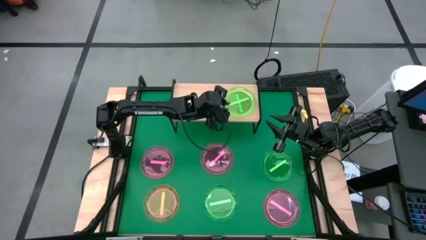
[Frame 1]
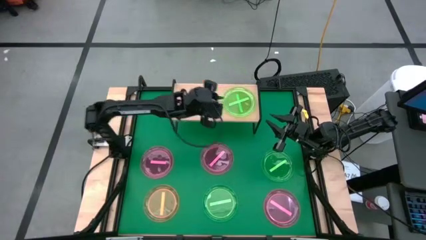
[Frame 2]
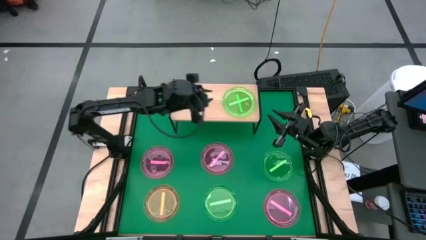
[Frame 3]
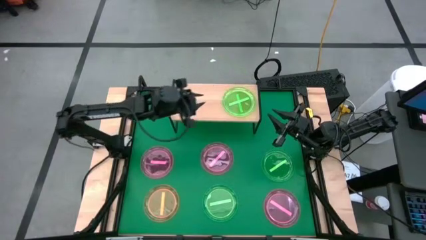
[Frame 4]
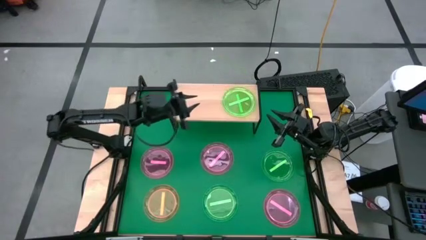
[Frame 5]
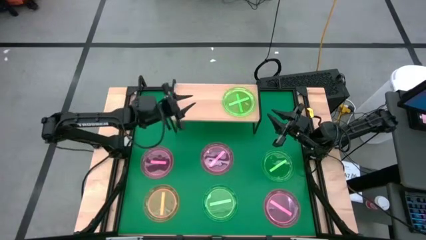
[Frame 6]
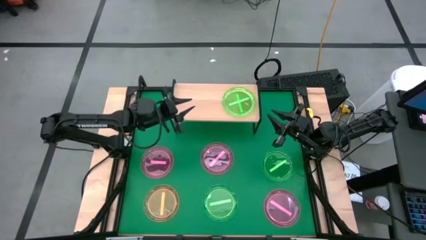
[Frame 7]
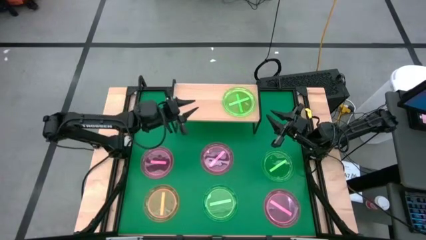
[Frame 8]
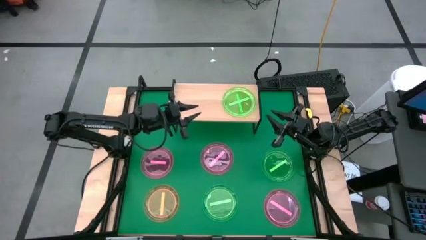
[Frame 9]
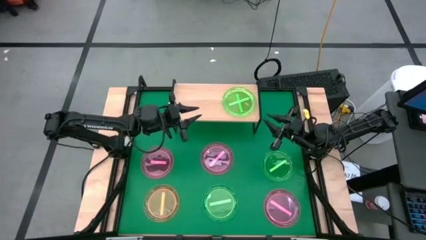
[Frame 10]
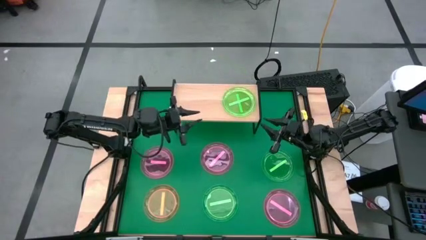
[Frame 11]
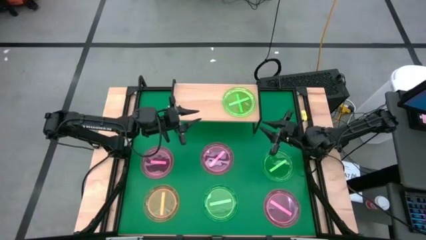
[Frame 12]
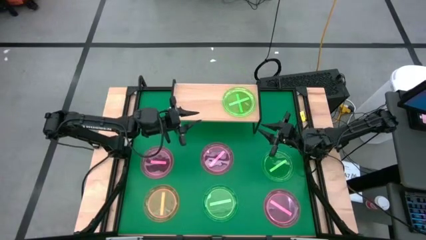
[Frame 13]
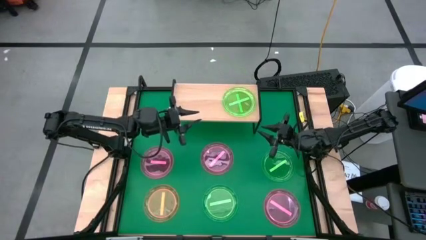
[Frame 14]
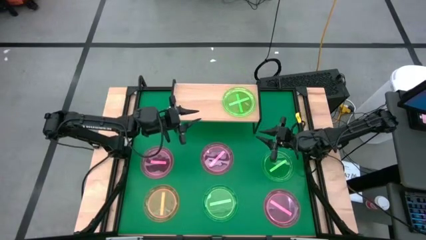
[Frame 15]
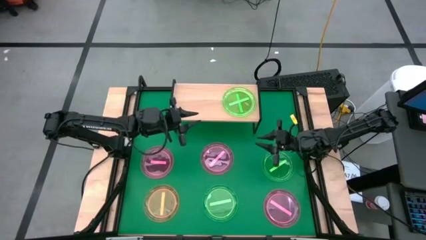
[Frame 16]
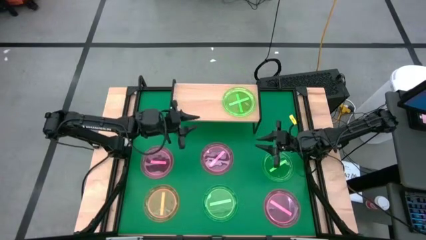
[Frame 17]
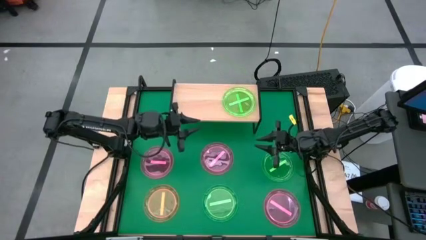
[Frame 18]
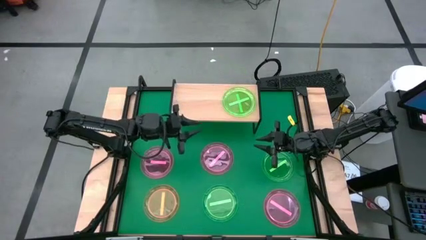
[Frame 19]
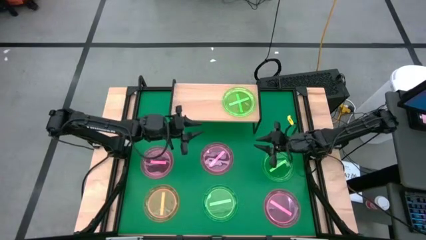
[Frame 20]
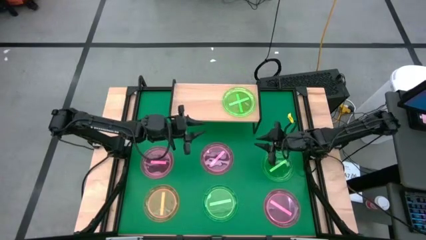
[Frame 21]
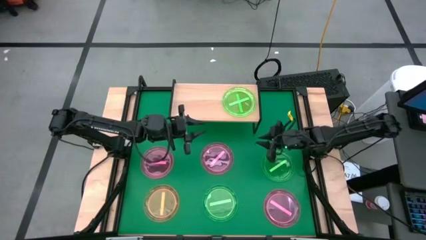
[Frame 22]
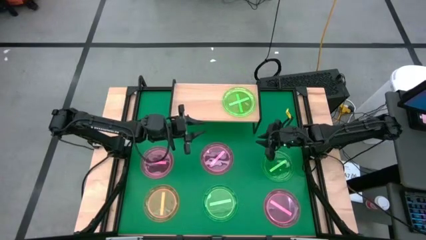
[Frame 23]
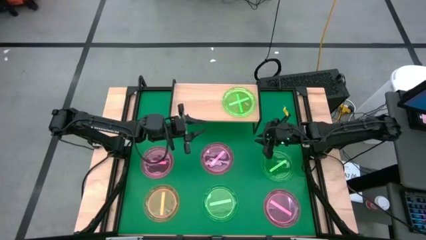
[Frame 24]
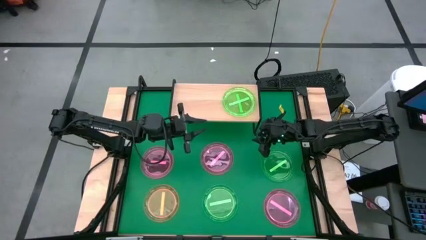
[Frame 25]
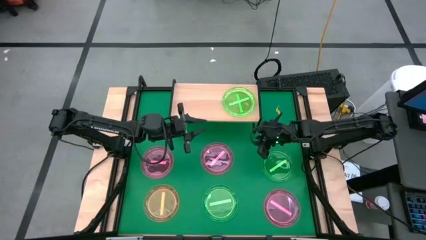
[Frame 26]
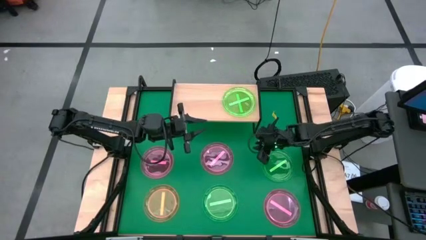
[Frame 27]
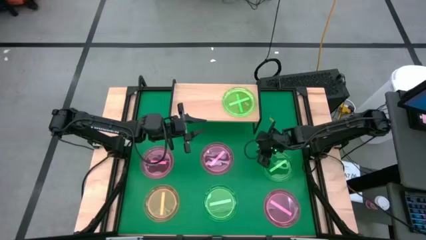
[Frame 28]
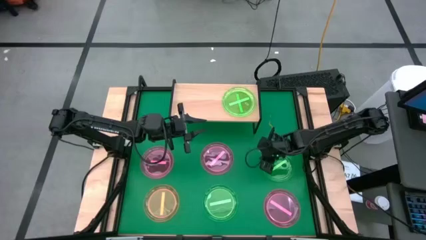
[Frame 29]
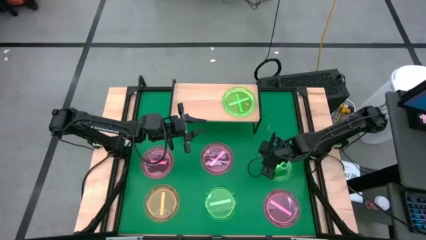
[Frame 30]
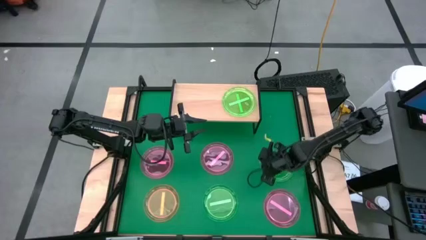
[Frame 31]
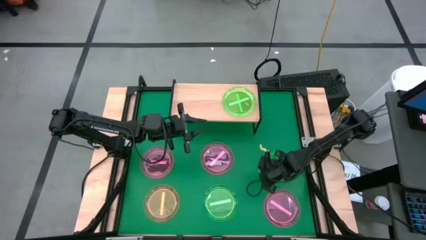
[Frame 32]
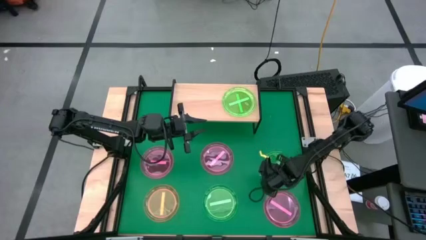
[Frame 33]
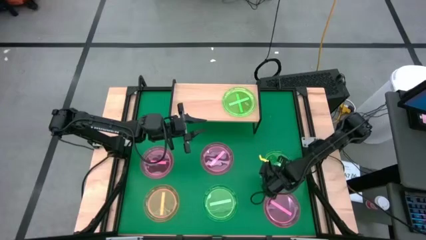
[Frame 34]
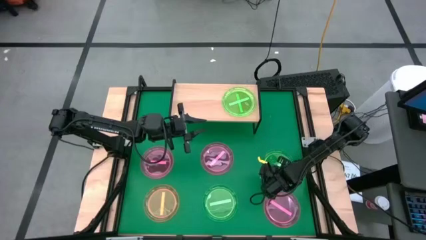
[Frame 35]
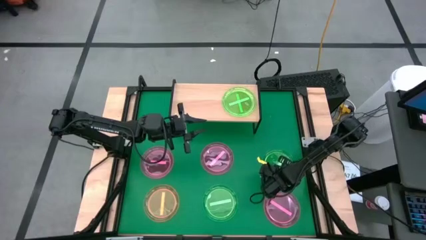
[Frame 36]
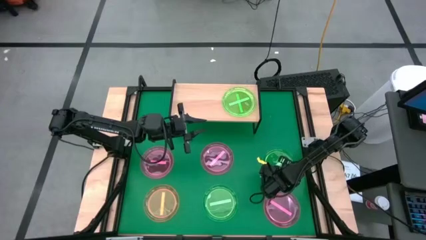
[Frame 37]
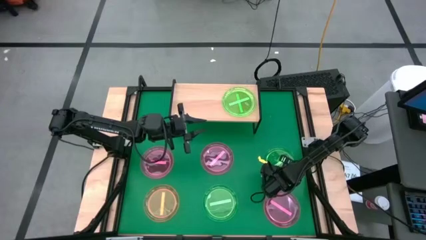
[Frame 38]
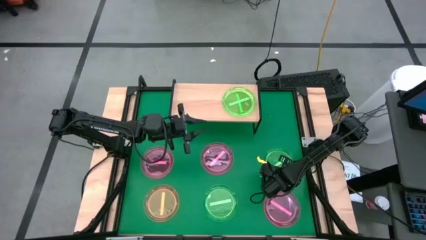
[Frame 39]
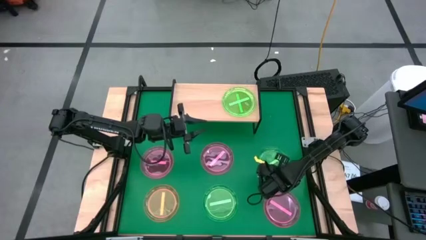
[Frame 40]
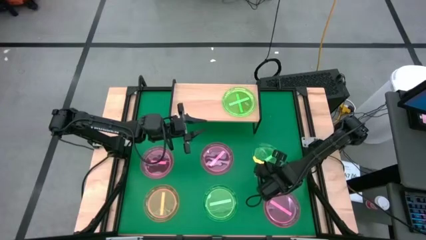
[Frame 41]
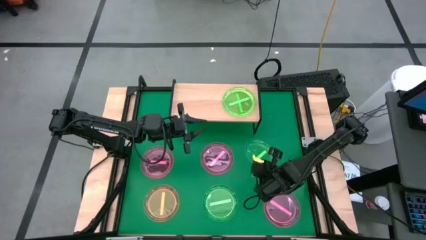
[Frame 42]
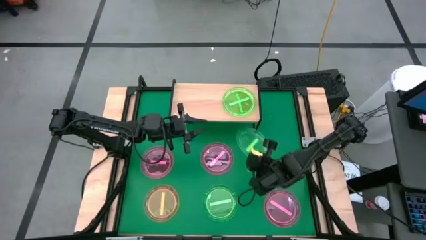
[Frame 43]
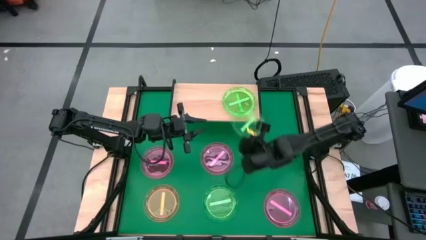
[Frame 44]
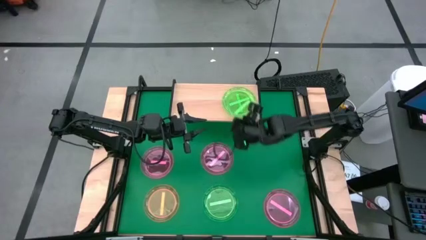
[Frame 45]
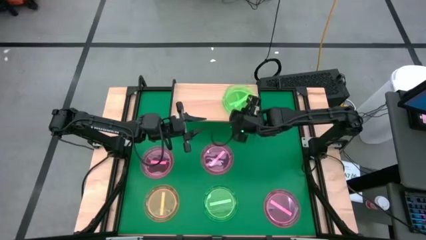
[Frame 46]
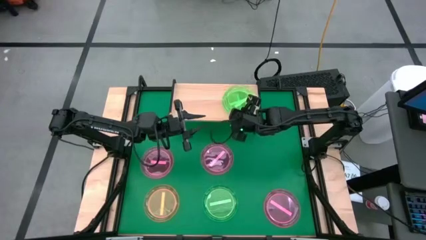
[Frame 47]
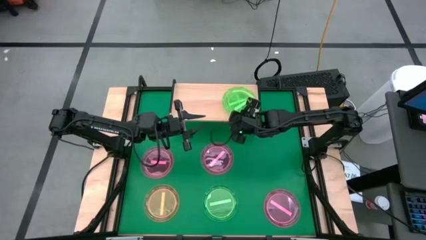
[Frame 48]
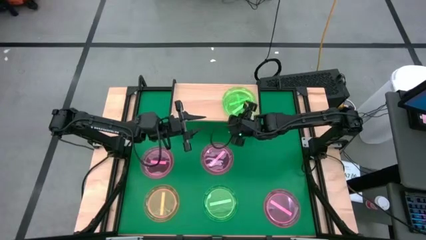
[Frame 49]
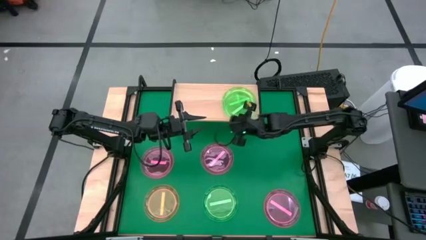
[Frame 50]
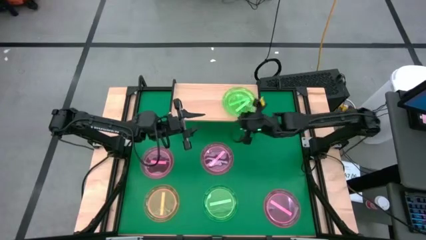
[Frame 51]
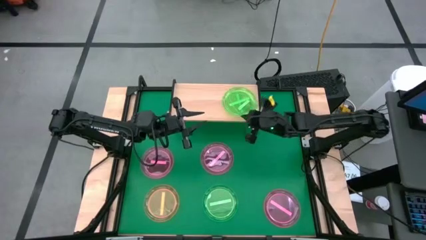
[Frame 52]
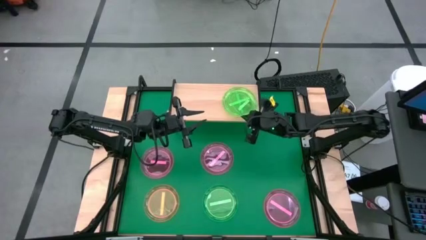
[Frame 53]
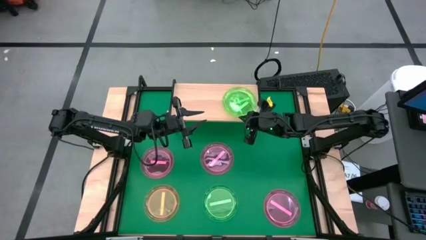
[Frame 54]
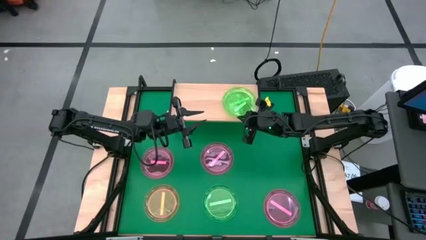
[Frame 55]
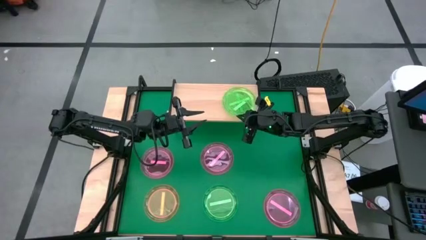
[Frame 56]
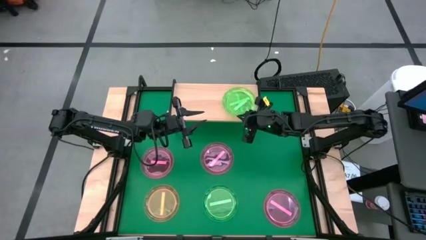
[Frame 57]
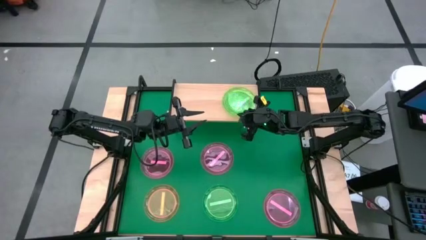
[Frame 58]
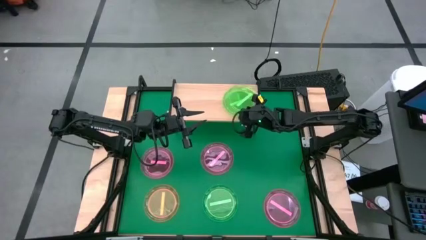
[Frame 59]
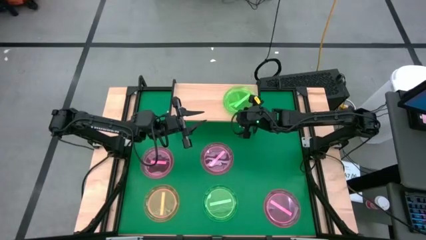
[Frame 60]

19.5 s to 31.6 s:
Task: Place and stack plates onto a shelf
Stack the green plate on top of the green plate on the shelf
